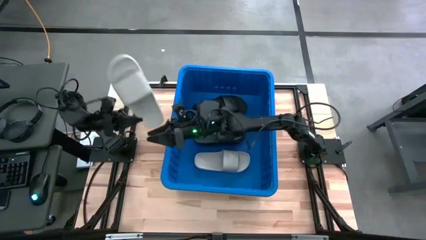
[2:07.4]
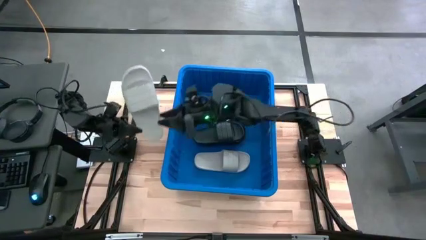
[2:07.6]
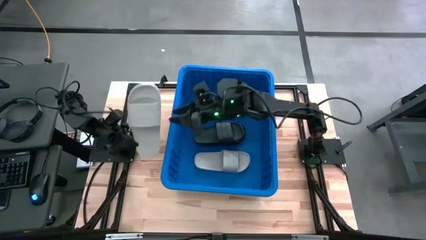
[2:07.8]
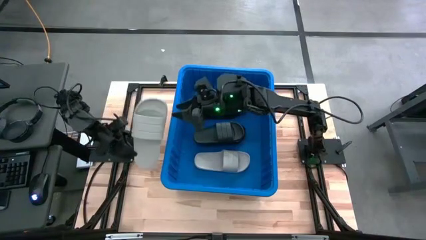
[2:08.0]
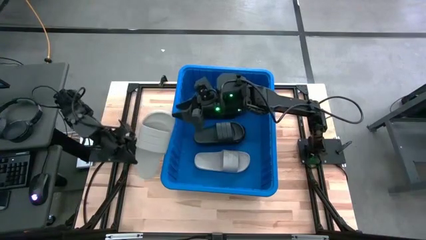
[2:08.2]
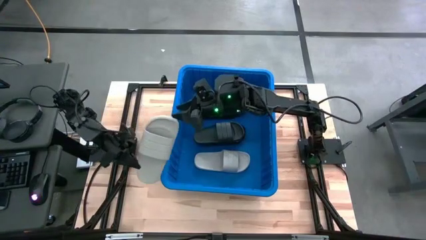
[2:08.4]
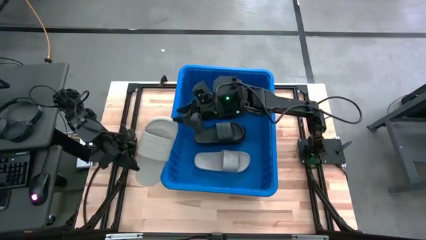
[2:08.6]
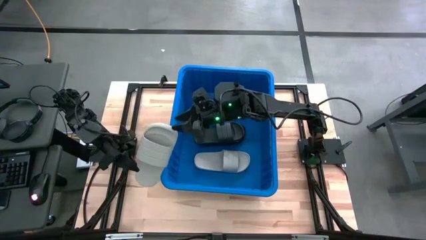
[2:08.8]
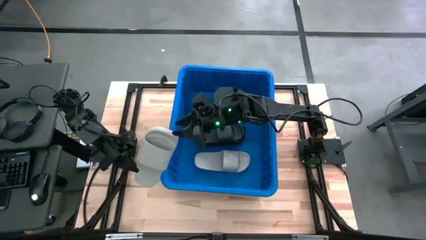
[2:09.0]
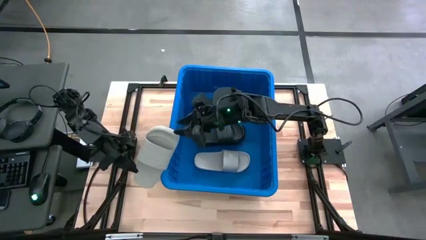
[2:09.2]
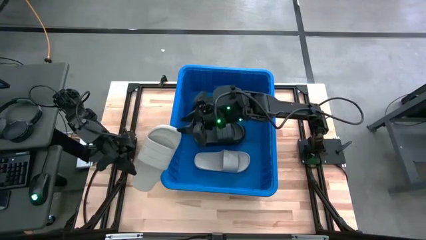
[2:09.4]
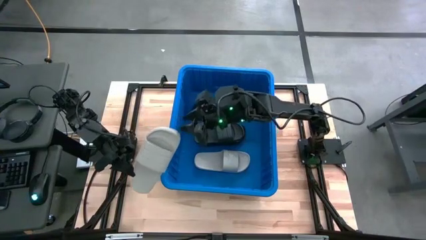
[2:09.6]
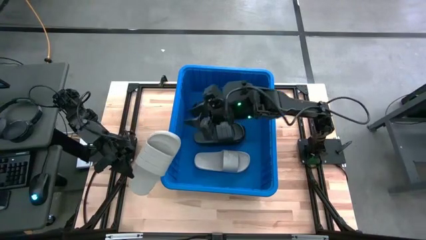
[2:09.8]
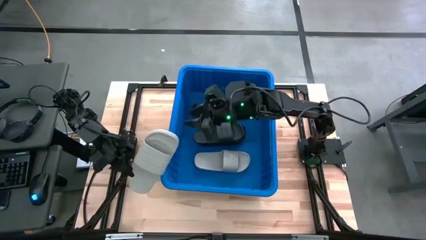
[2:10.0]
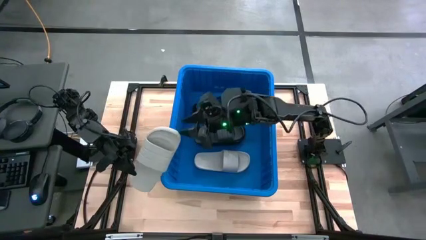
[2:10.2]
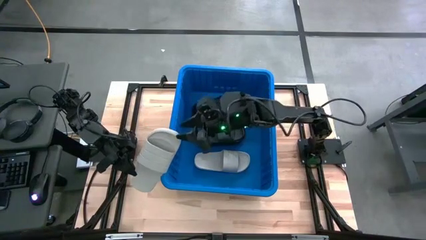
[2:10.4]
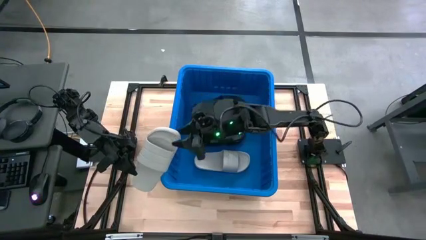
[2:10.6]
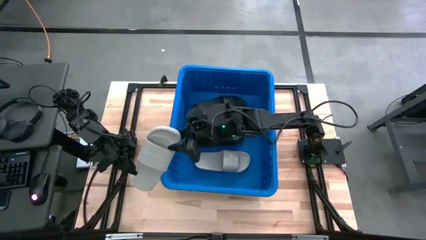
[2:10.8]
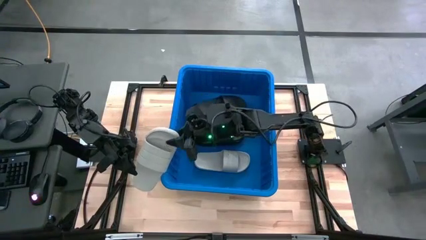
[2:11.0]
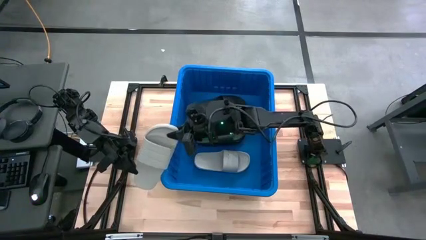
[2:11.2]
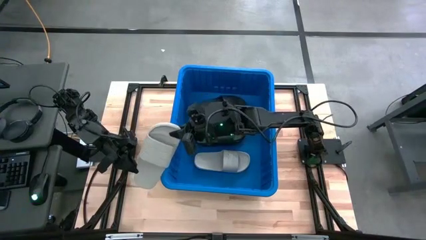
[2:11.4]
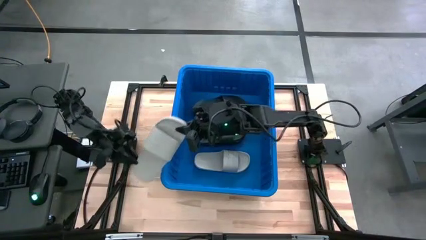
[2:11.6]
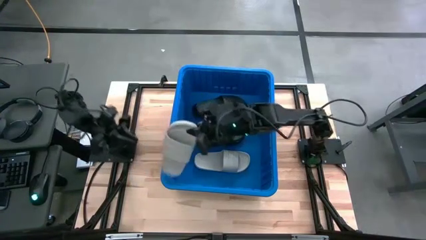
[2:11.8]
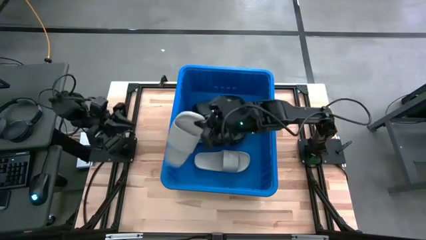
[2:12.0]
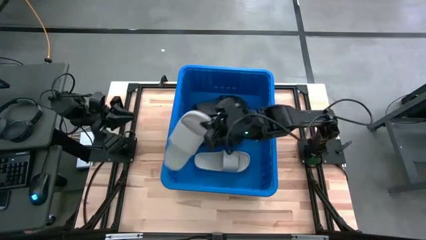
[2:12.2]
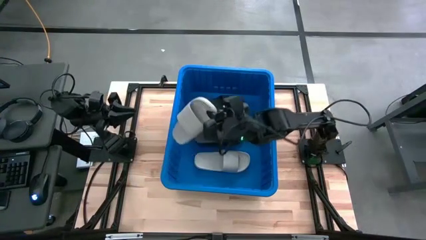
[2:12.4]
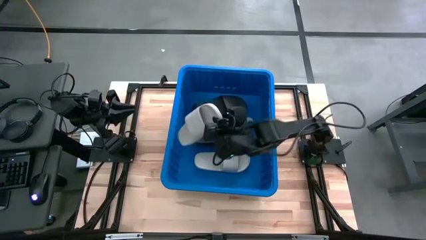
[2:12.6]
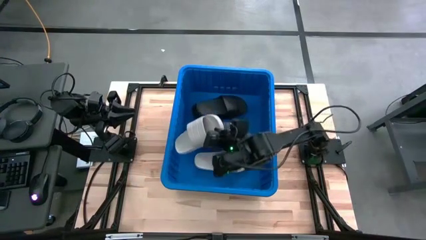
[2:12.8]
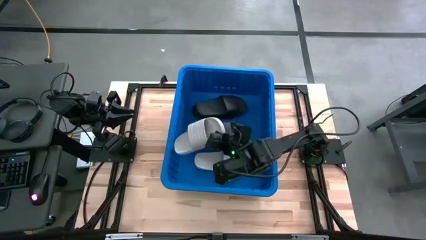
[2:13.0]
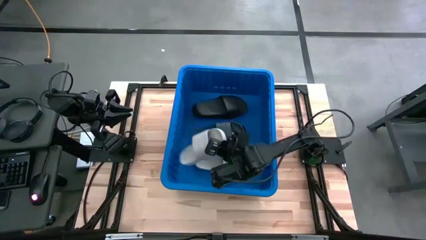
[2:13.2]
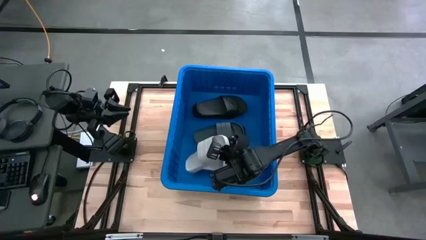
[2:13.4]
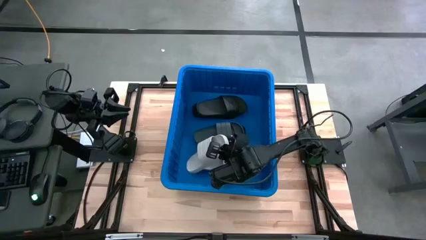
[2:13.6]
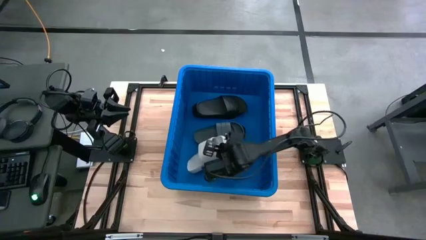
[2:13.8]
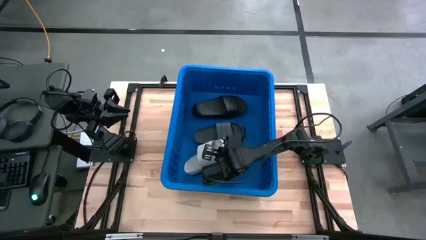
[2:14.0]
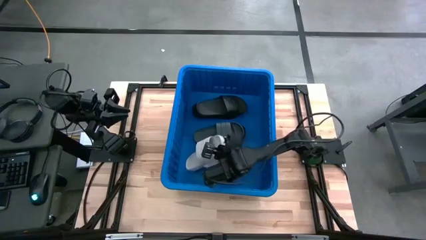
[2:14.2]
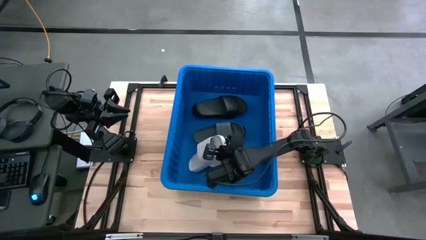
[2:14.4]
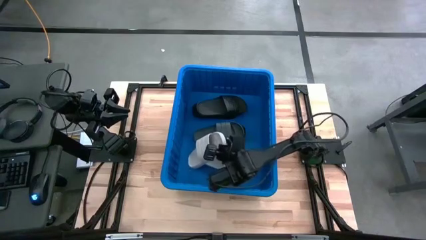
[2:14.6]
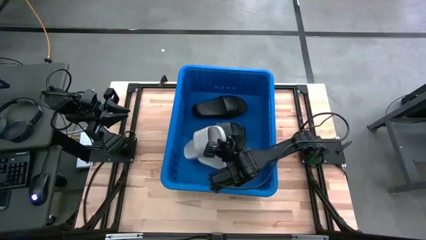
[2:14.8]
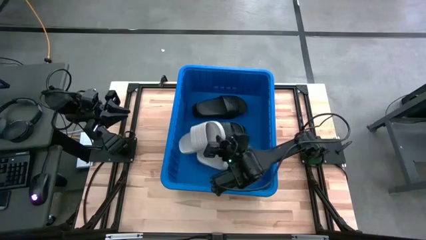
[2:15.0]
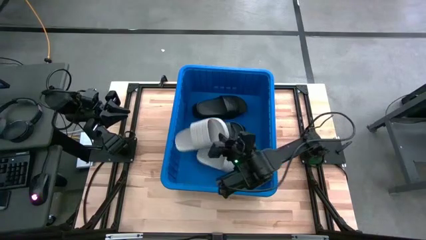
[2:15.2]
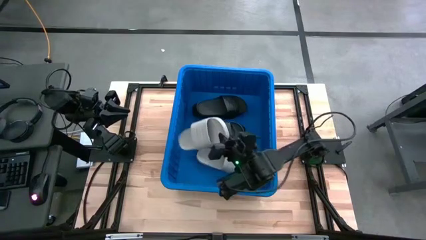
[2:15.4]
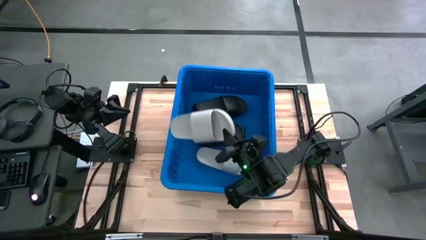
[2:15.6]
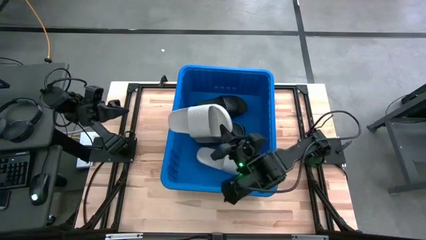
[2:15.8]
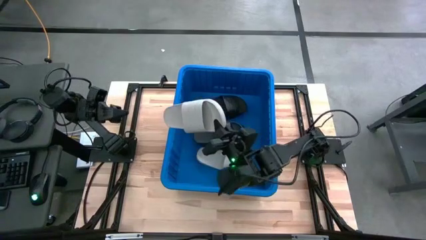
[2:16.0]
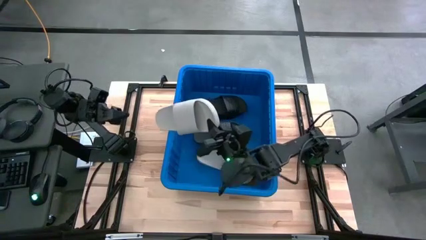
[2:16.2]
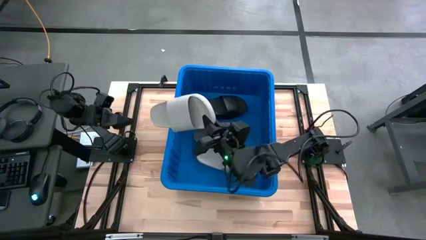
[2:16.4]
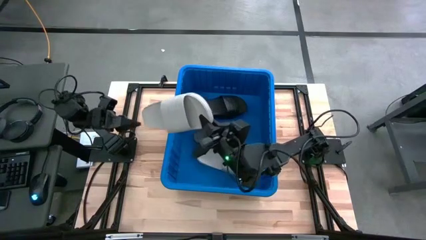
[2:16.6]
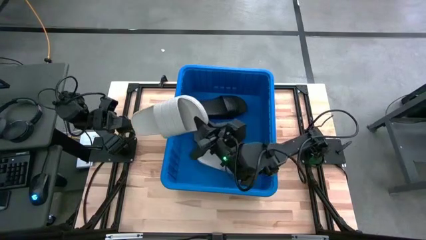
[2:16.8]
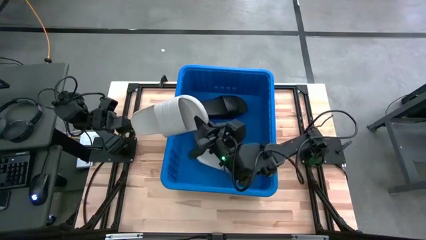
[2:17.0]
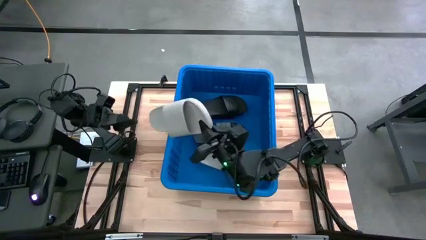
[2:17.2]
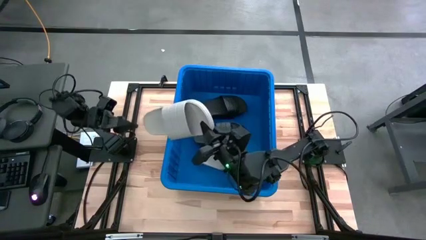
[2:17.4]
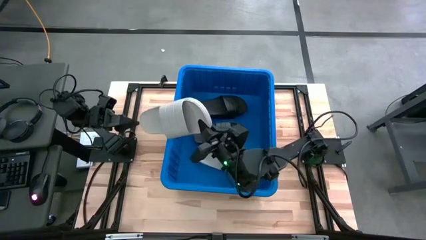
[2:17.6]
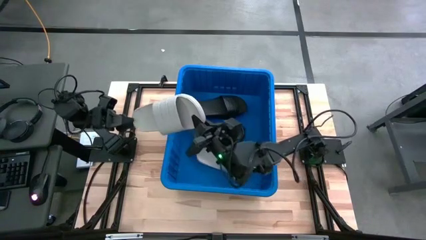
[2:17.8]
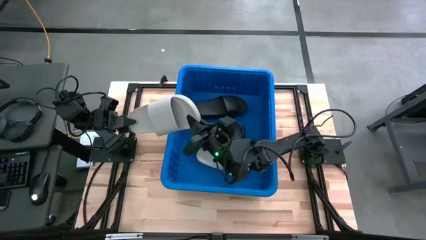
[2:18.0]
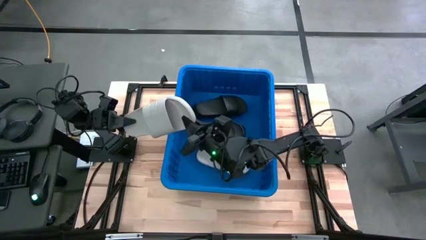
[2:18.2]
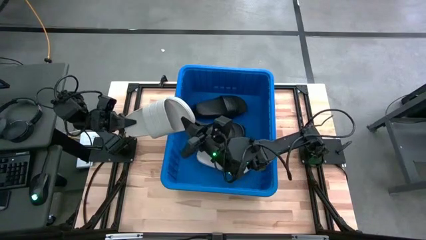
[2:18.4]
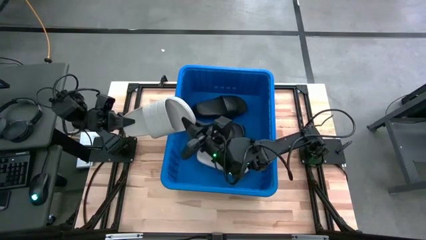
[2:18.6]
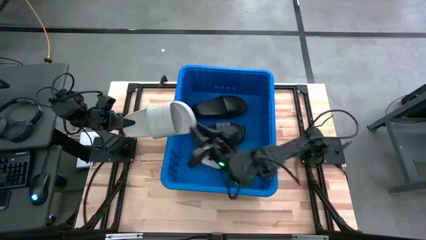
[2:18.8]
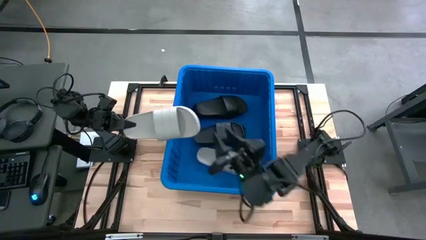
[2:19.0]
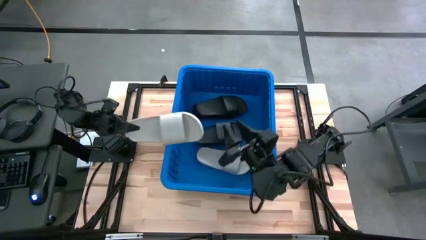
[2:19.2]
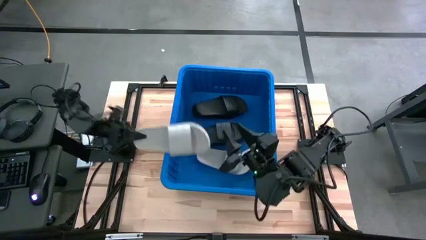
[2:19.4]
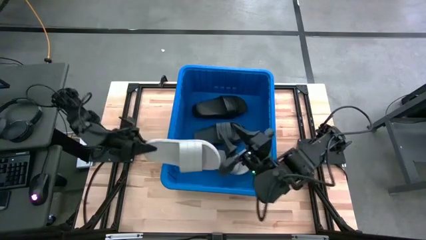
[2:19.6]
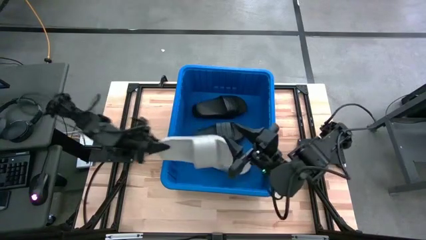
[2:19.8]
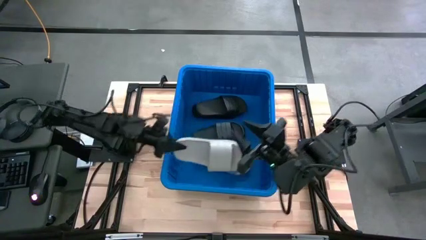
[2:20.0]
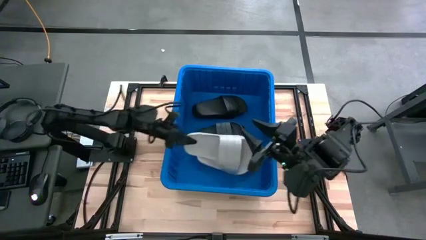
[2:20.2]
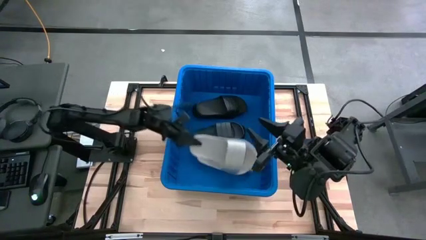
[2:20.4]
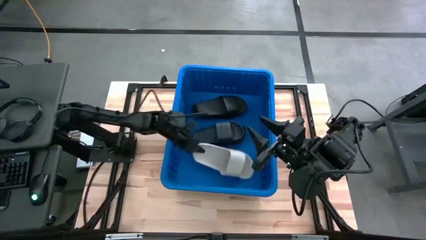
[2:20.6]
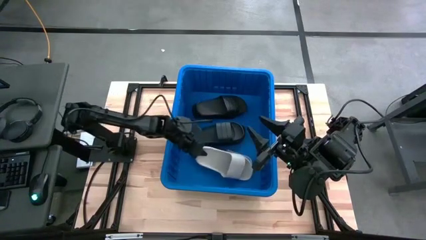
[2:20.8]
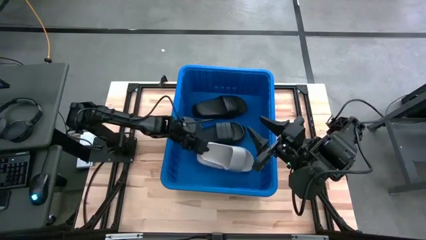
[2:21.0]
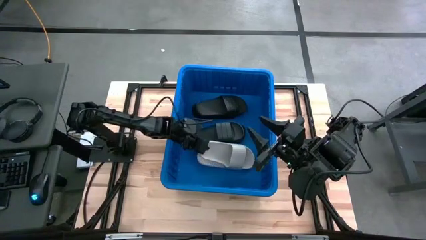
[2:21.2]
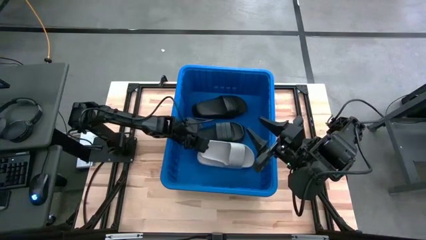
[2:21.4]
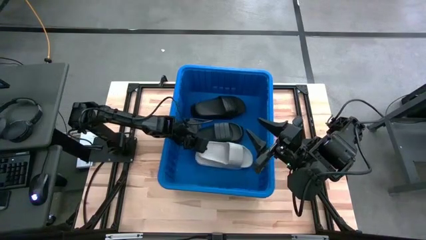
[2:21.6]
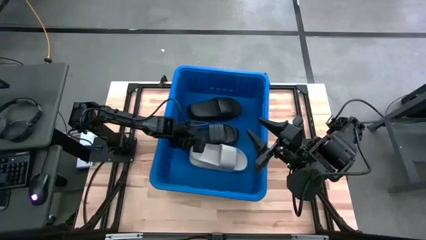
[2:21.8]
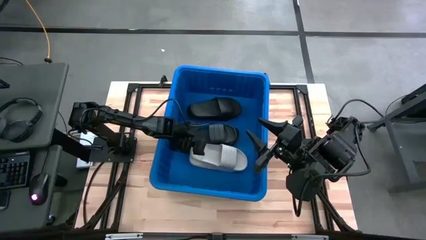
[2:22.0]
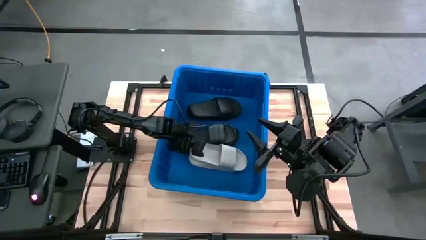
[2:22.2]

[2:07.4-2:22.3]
Task: Pick and place slides into bin
Put the gray slide into the blue container

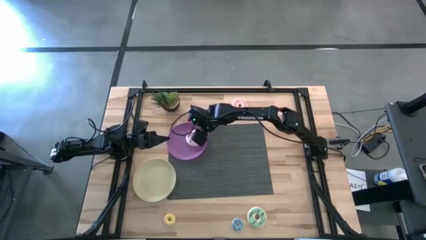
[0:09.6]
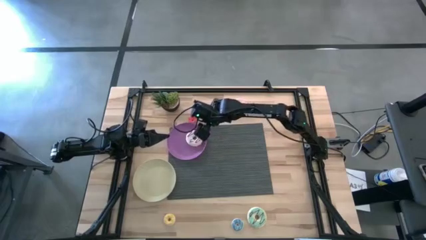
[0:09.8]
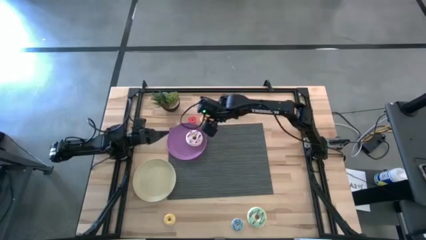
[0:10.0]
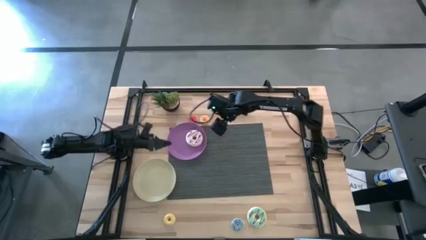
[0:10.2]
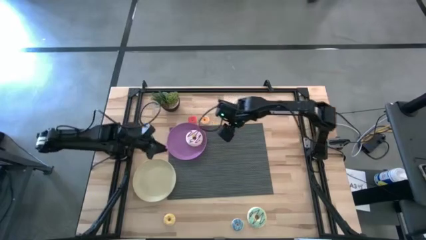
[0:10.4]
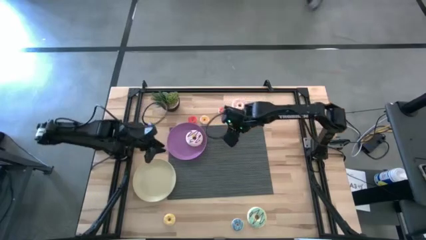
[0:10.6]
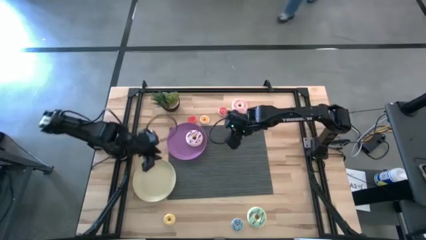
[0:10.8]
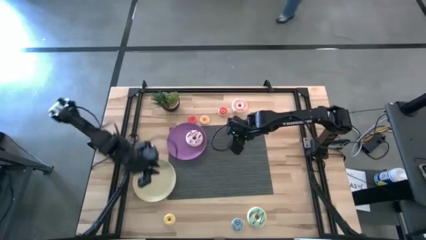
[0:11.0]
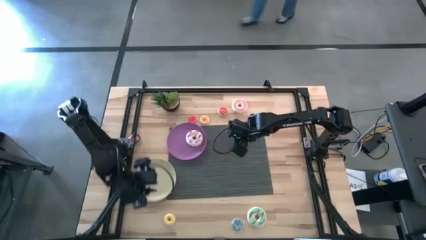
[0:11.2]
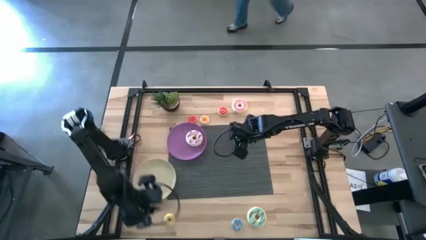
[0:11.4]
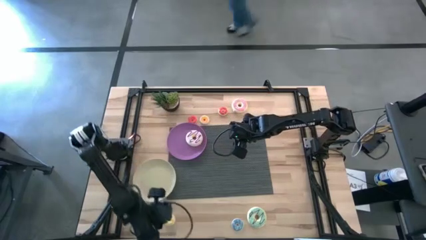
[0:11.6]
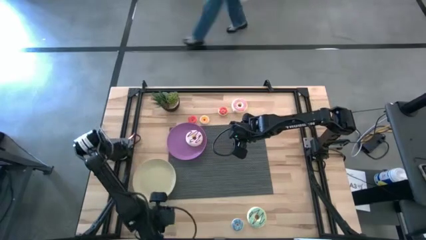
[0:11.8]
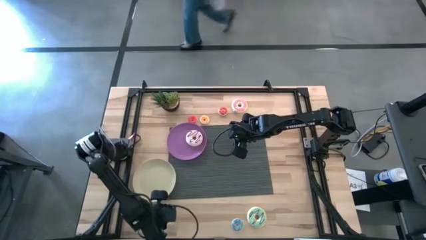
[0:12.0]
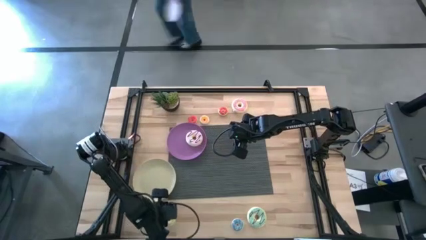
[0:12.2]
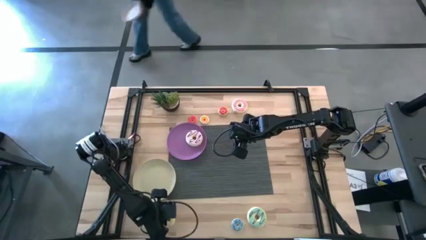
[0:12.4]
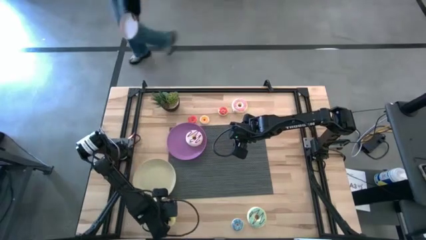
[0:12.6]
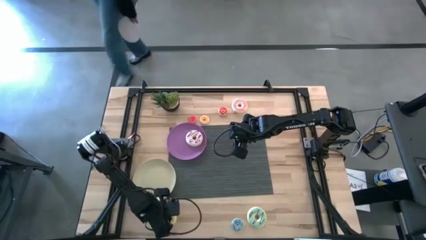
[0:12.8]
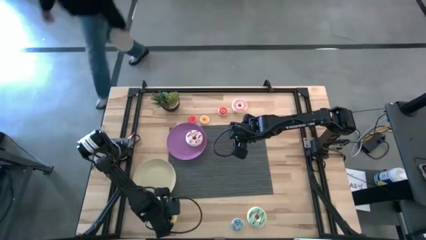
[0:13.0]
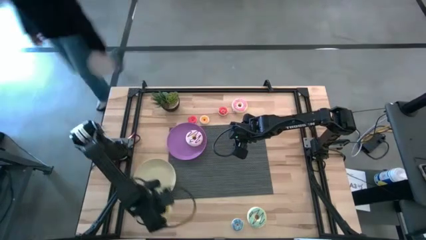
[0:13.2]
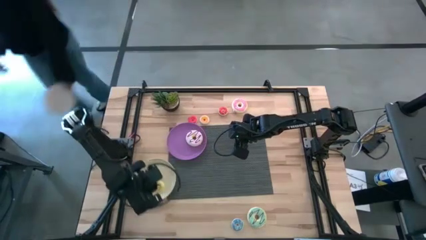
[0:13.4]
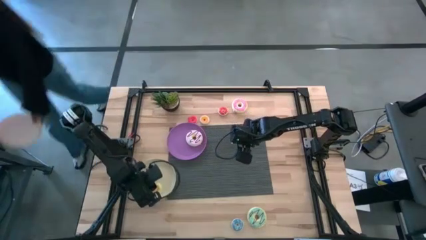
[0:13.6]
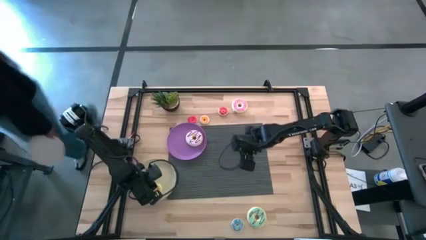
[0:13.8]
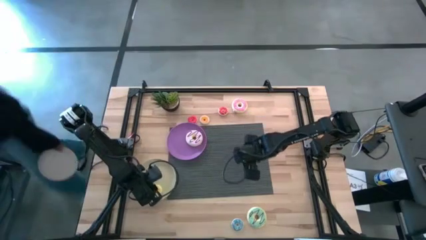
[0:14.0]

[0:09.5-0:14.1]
Task: Pick & Place donuts
Put the small yellow donut on the gray plate
